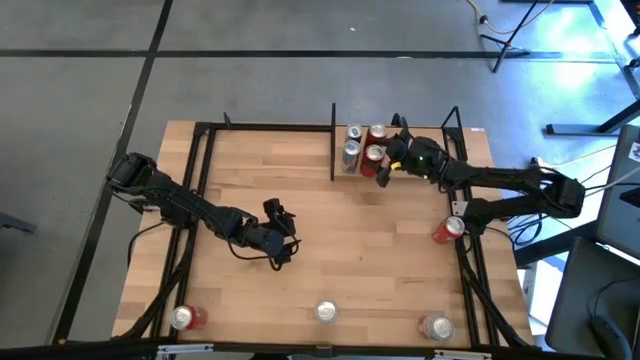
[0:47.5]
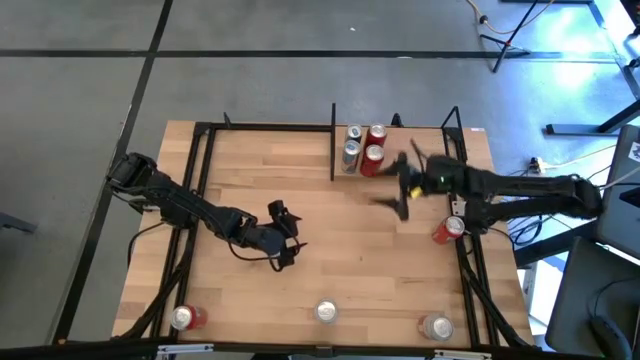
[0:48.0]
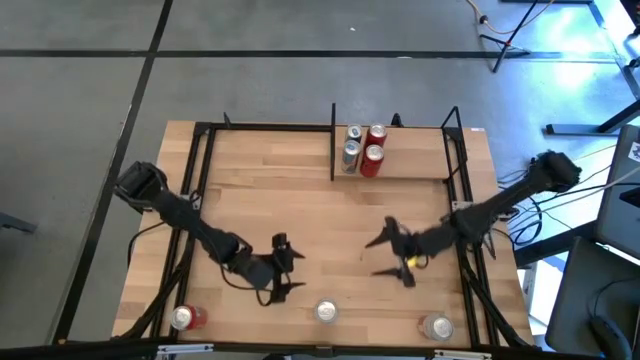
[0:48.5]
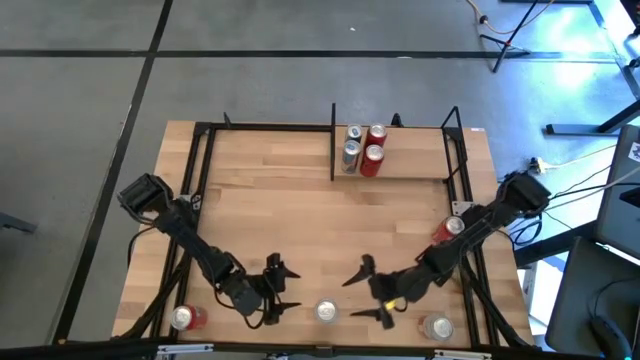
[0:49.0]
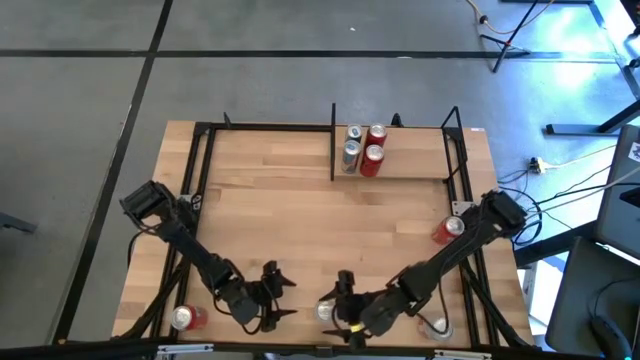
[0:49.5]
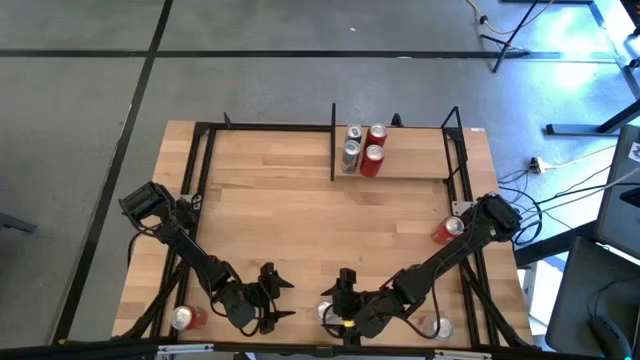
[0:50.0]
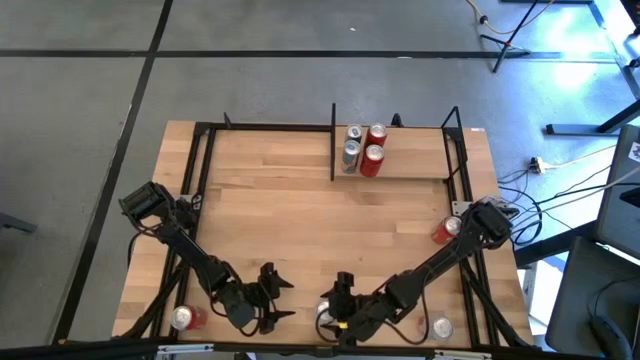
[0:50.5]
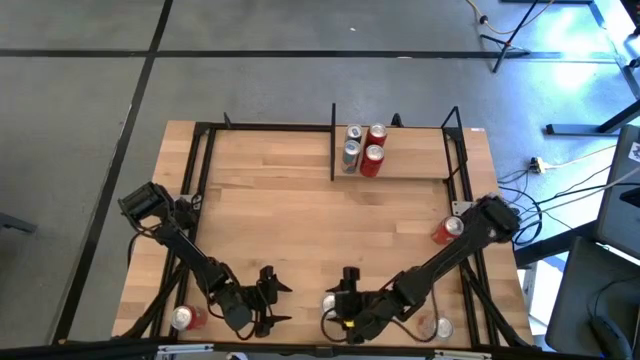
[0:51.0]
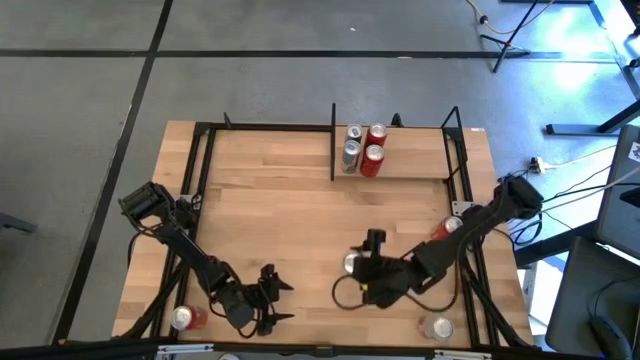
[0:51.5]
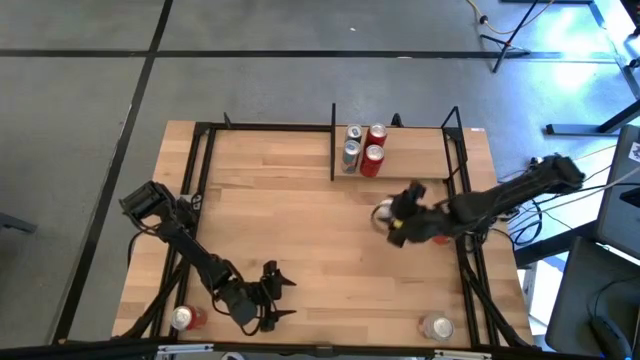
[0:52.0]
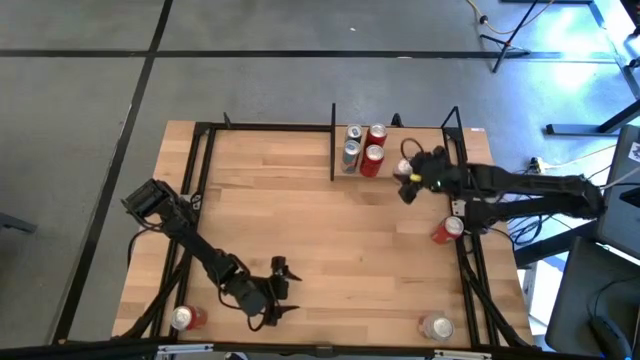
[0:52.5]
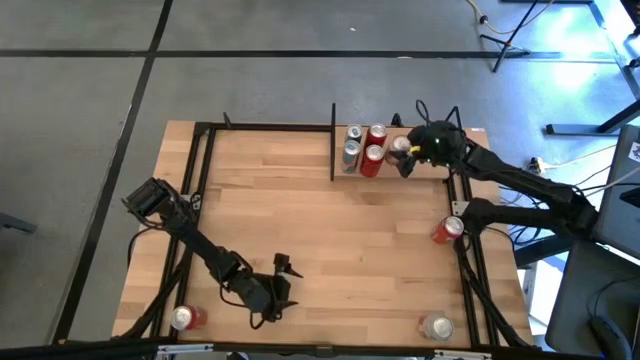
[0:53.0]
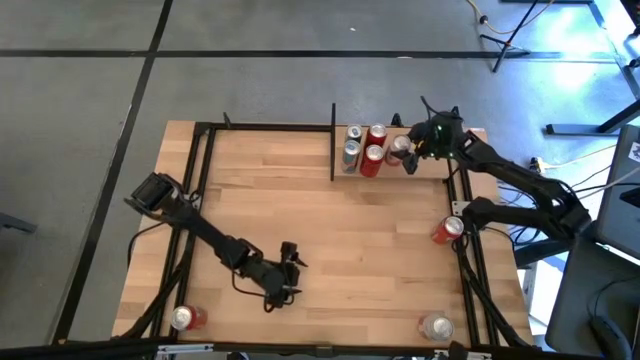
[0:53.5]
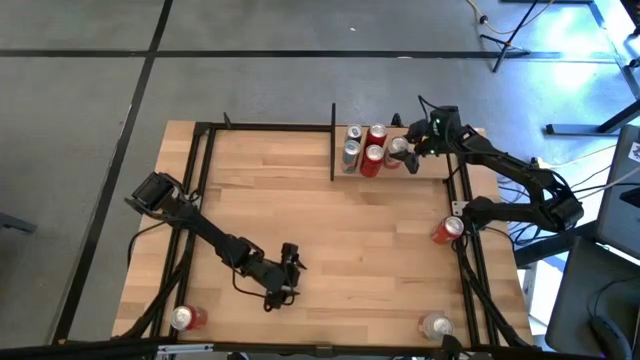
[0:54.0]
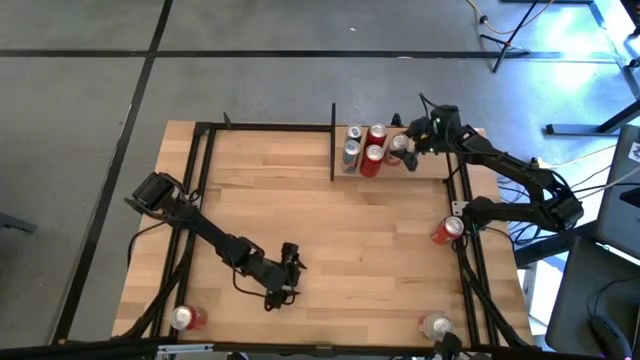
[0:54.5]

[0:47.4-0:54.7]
Task: Place canned beverage on shelf
Put the left pink soda can on the shelf

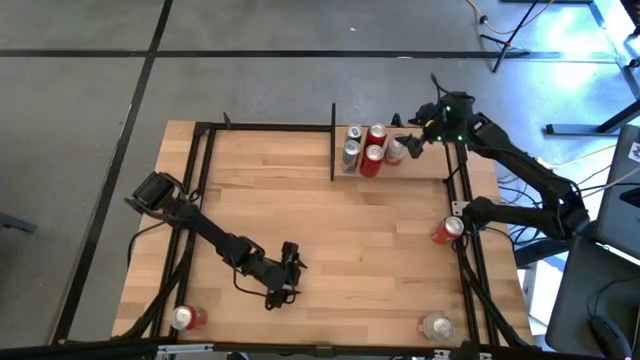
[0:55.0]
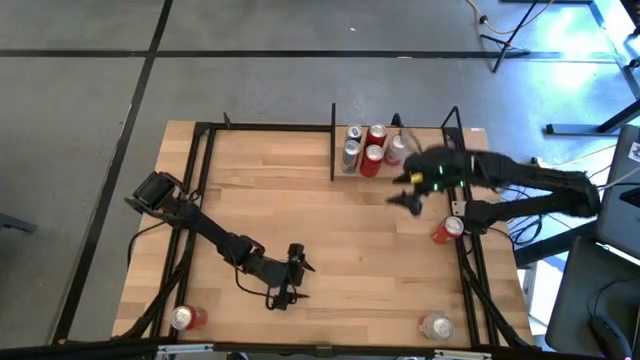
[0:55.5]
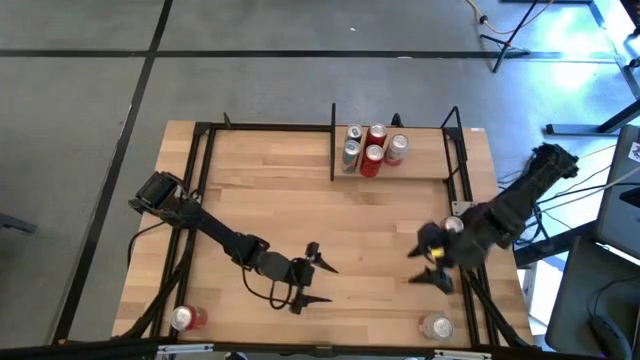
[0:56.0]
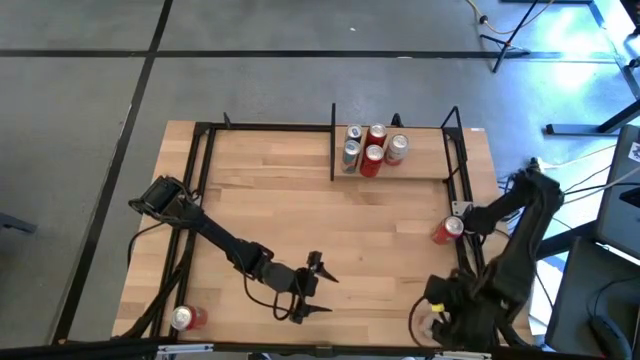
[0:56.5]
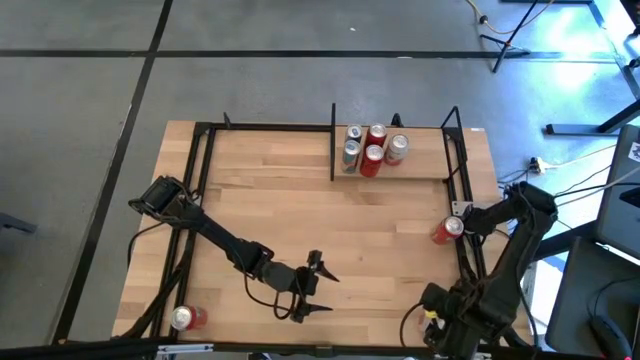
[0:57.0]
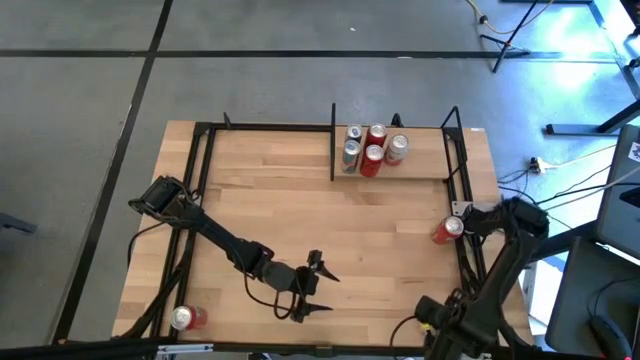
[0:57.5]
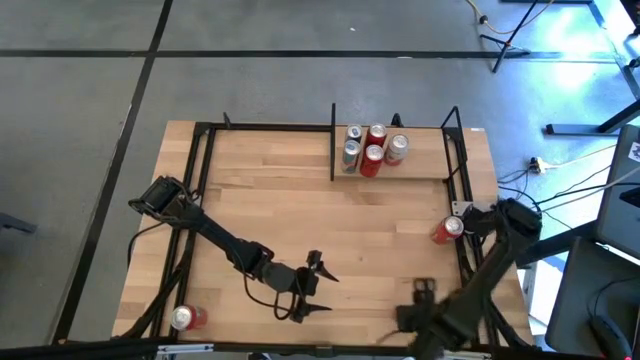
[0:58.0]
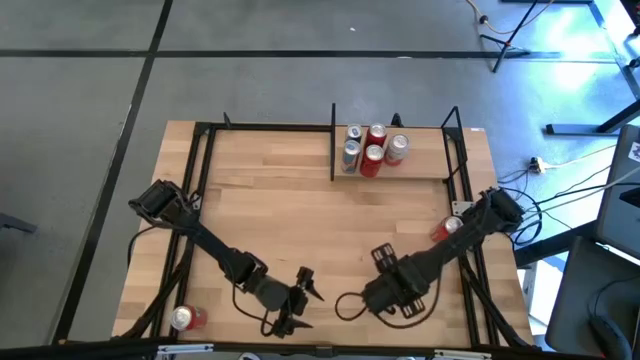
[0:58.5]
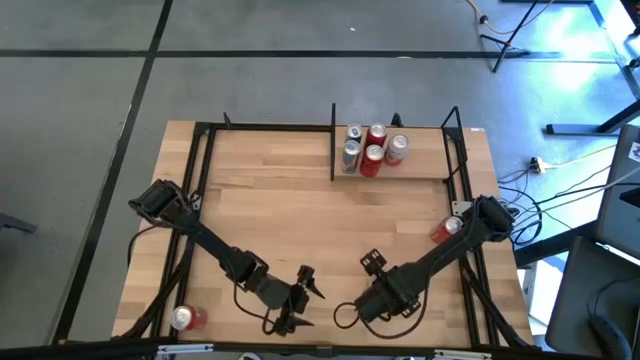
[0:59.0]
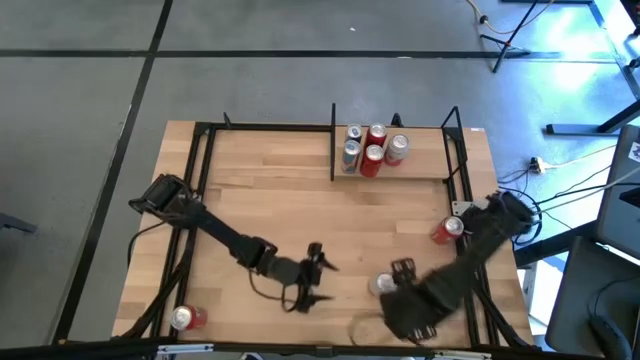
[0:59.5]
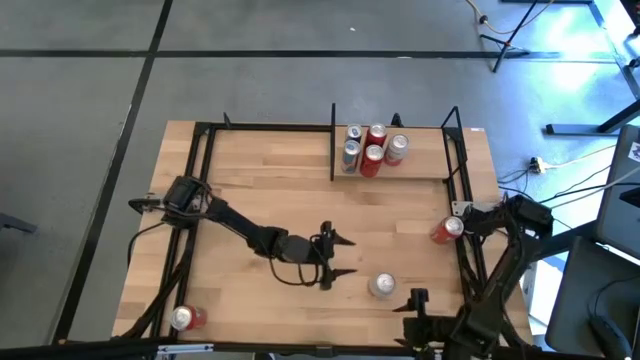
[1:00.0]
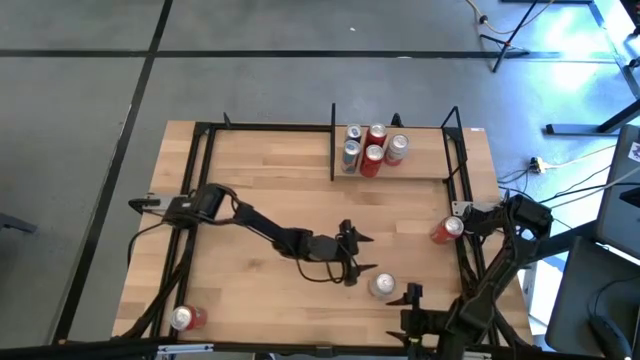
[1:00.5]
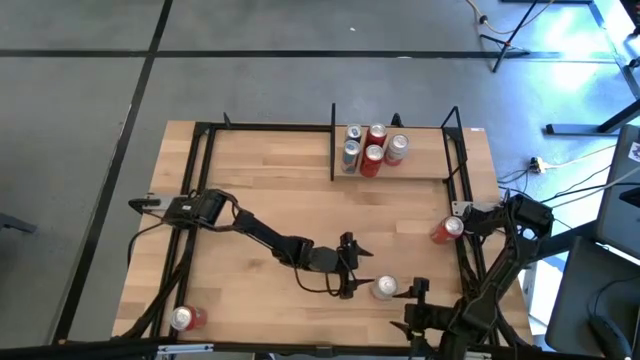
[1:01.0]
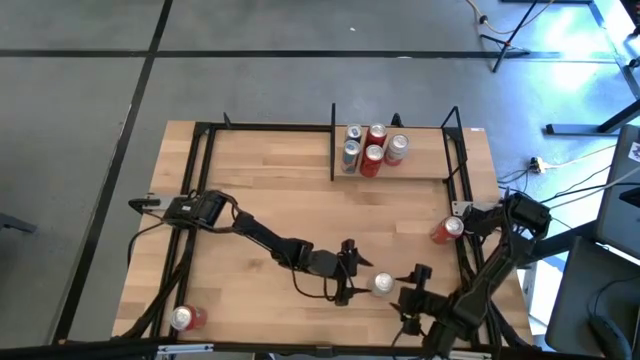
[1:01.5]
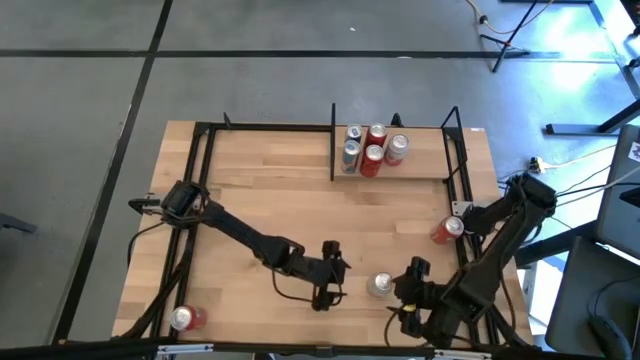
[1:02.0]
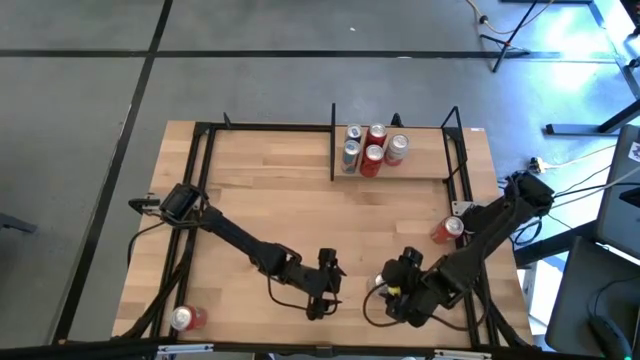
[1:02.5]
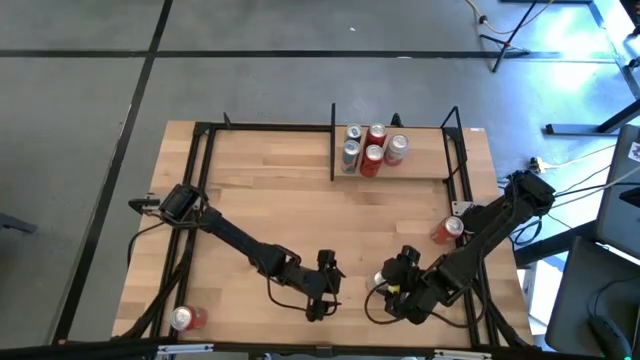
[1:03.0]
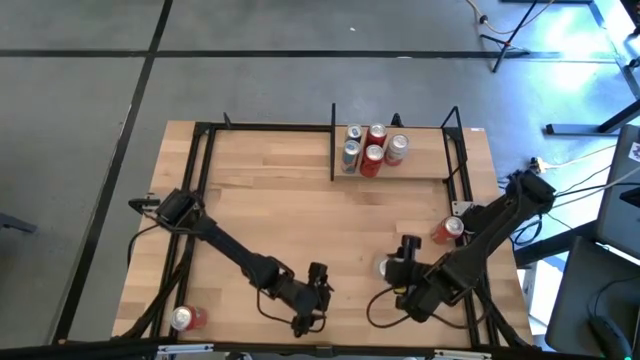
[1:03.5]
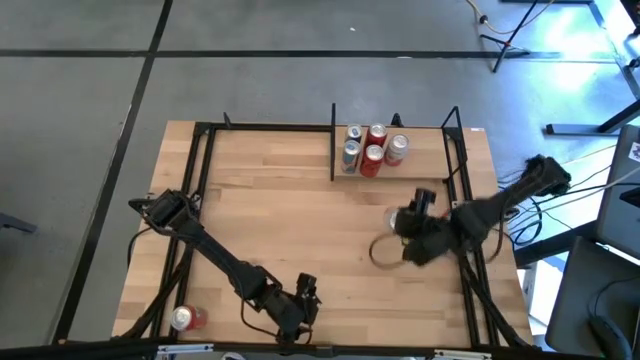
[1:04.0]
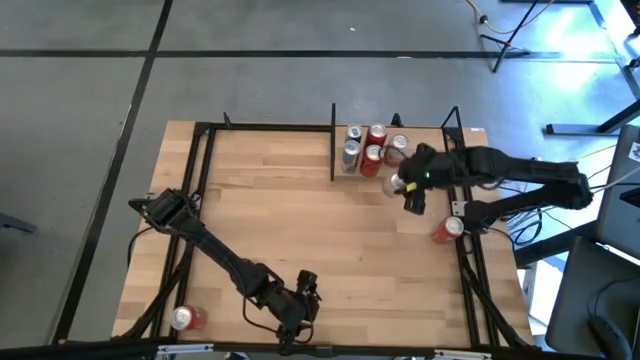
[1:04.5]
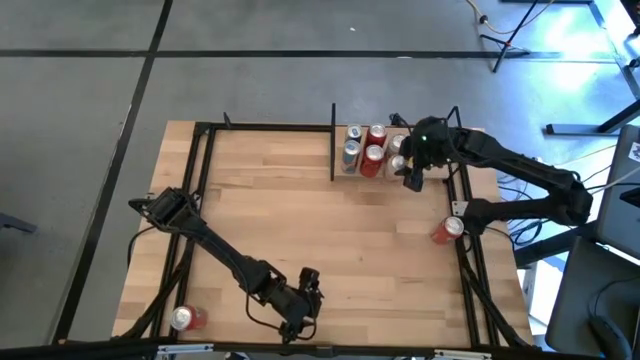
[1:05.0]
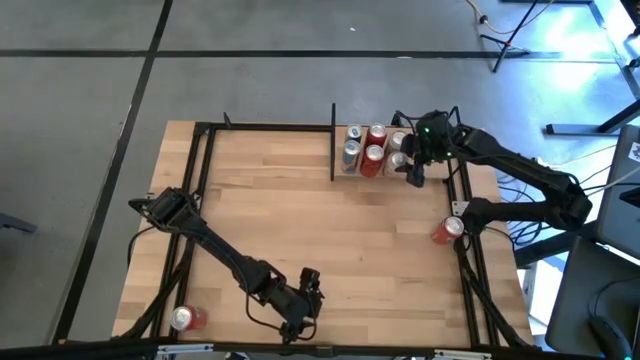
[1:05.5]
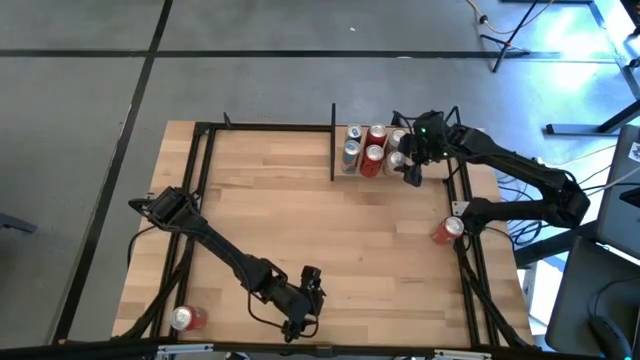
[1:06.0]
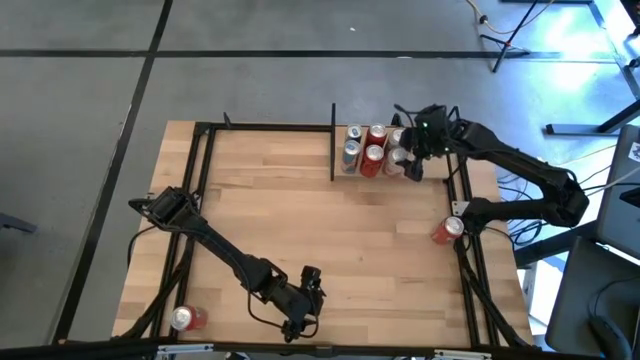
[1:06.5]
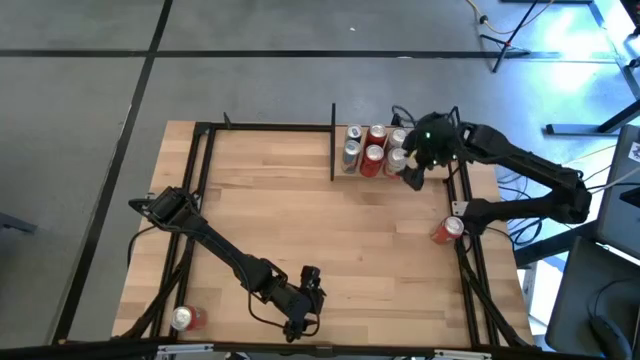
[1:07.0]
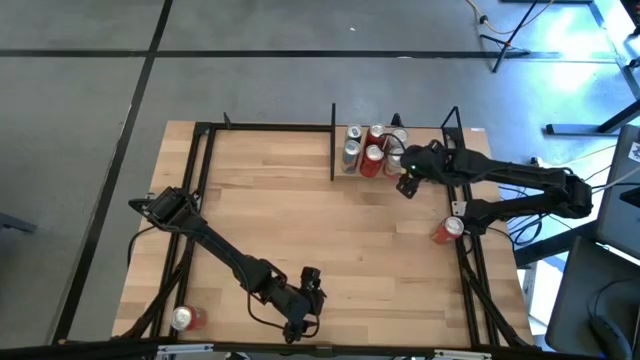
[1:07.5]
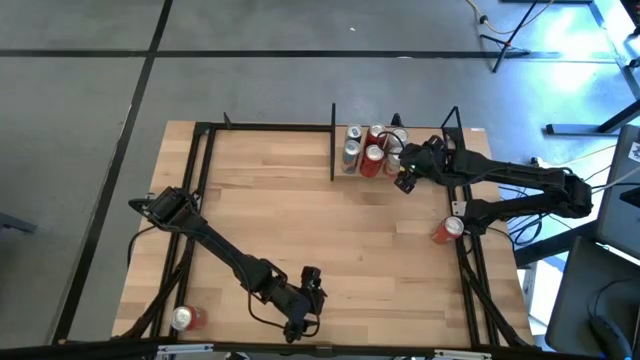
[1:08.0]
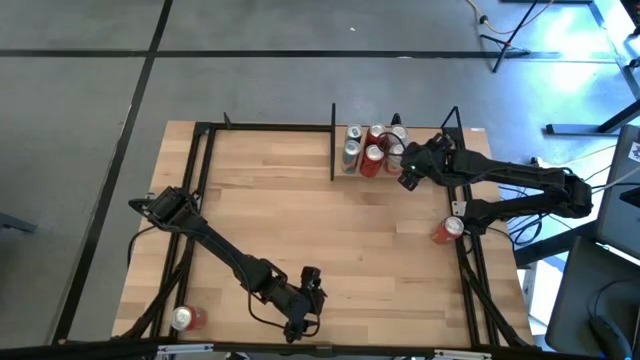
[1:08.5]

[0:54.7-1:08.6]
Put the pink soda can on the shelf aligned with the other pink soda can
